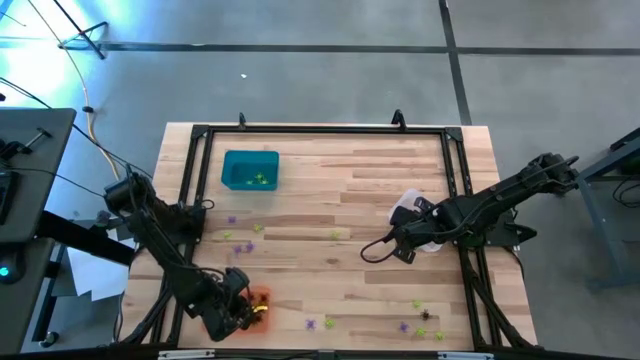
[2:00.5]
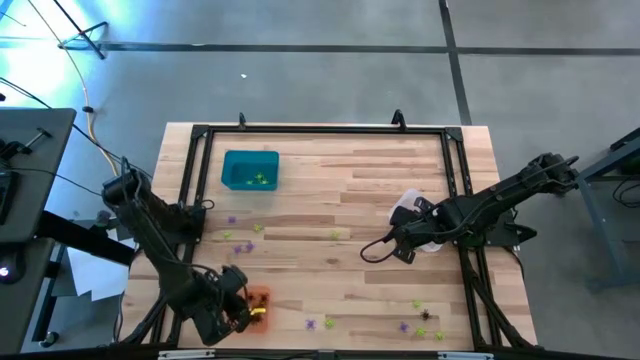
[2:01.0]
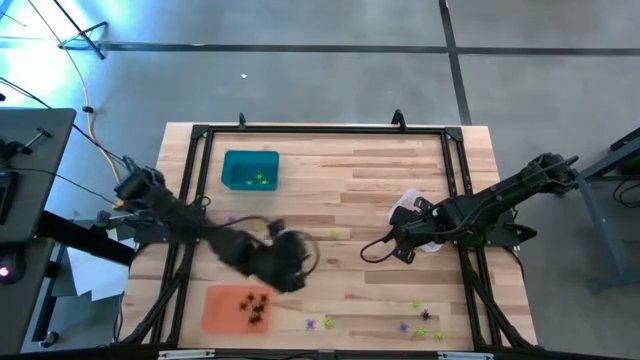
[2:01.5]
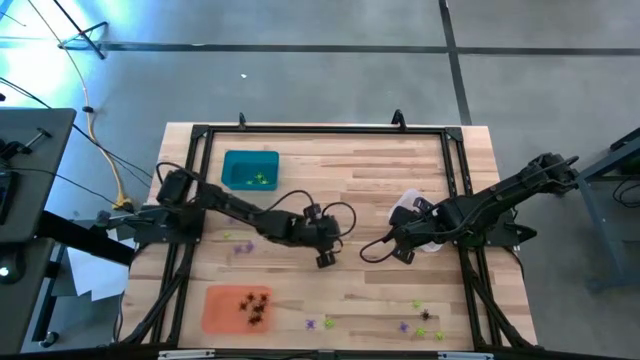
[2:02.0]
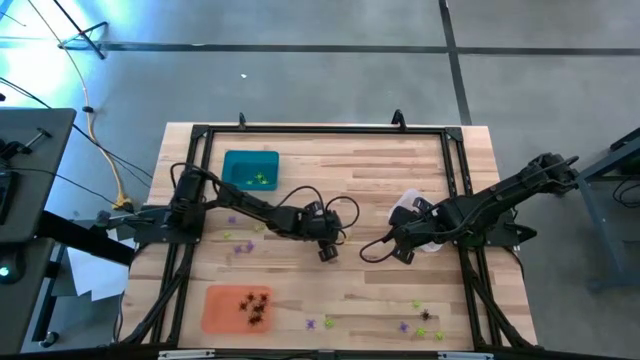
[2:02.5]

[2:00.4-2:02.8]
Task: Sort Halloween decoration
Put the green spider toy into the blue bin

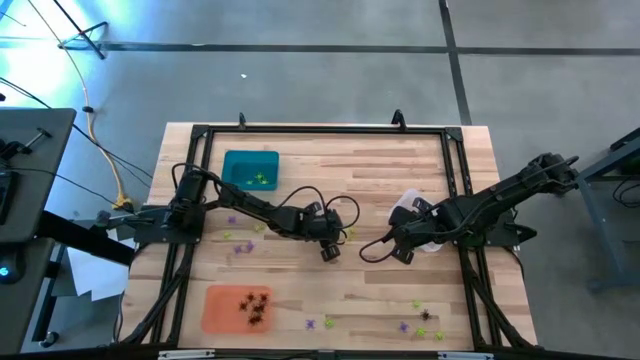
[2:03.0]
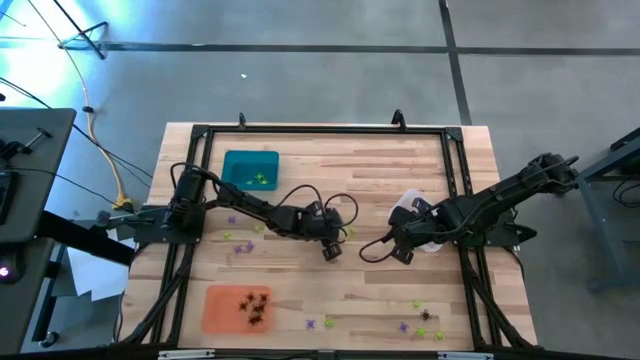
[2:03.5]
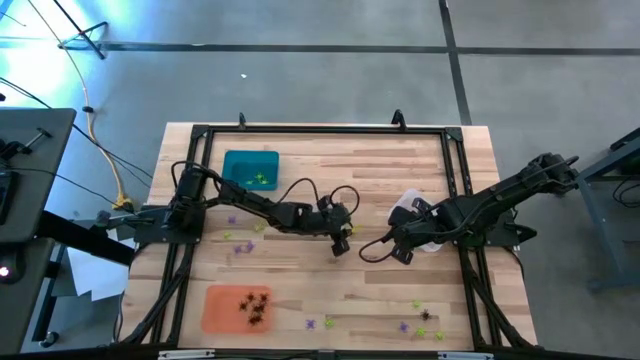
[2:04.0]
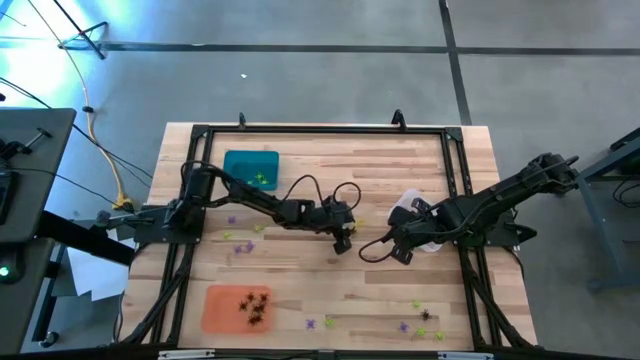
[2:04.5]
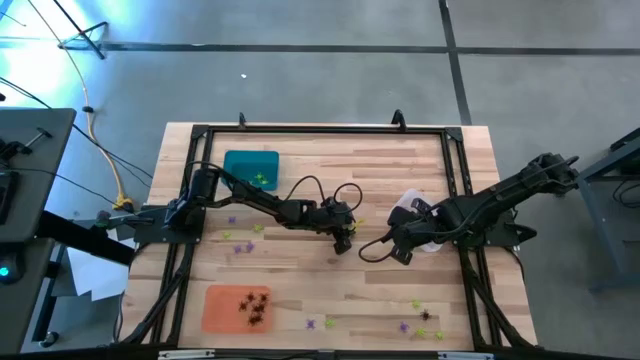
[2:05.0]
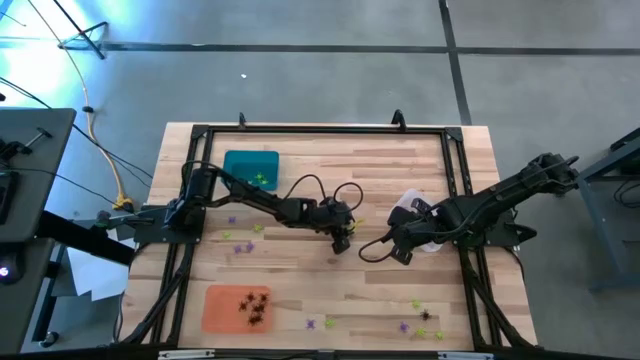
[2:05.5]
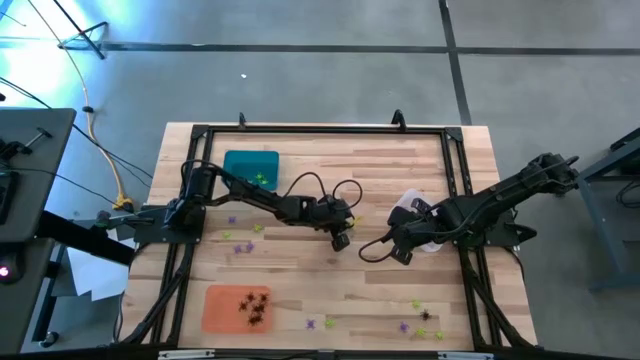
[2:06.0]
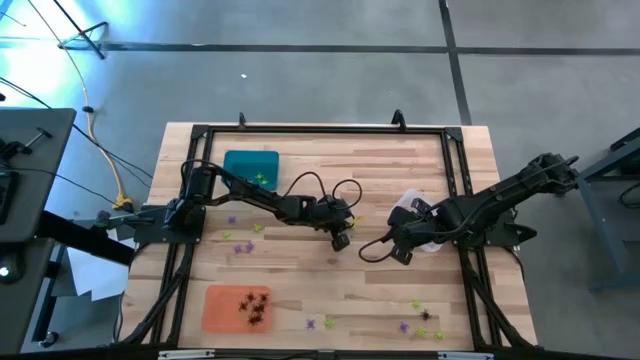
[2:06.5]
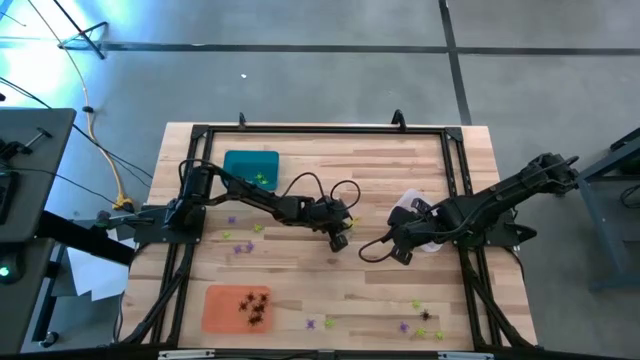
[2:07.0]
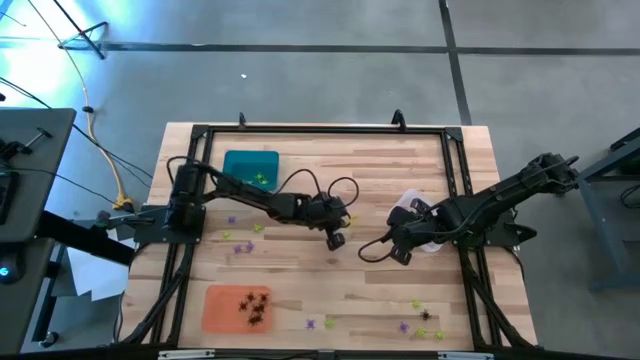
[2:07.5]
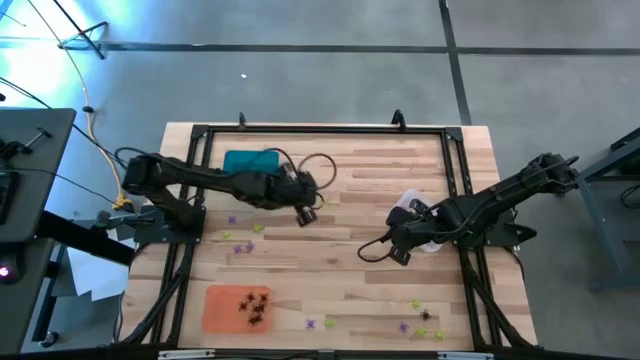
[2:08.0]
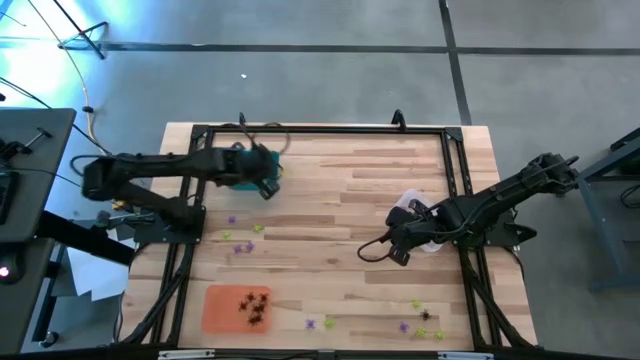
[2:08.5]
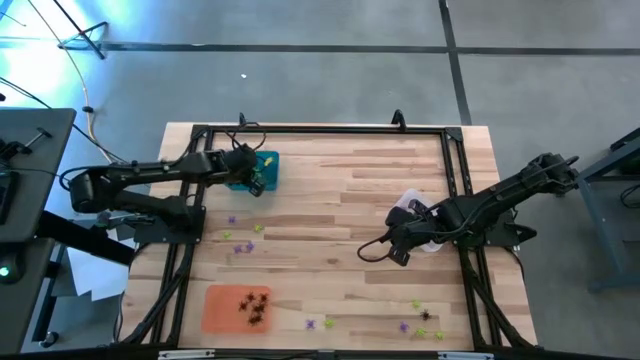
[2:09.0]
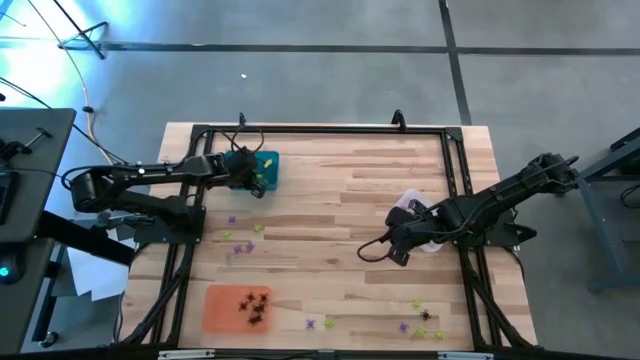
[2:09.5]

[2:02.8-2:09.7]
Put the green spider toy into the blue bin

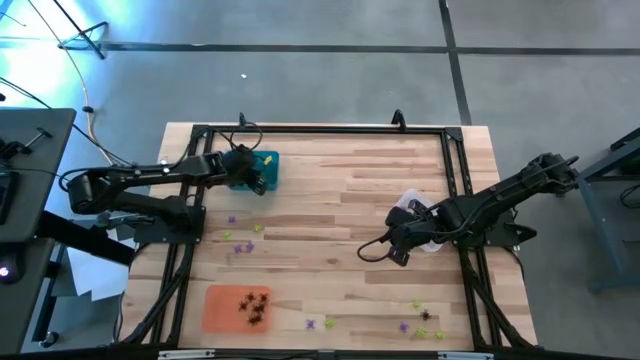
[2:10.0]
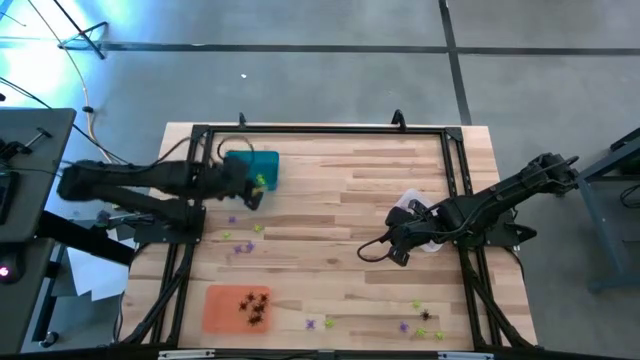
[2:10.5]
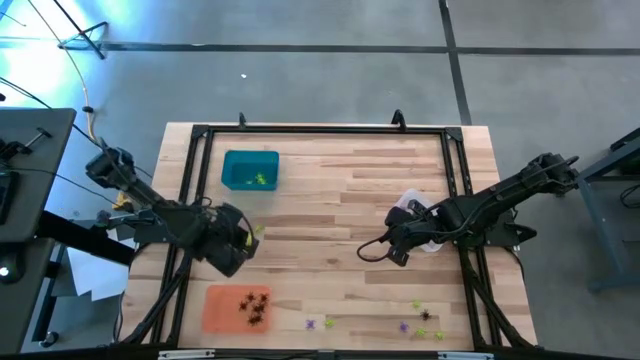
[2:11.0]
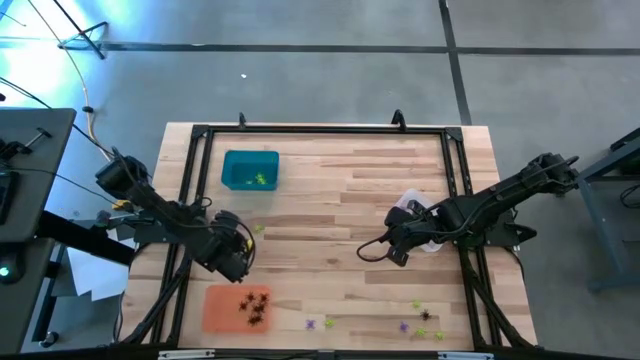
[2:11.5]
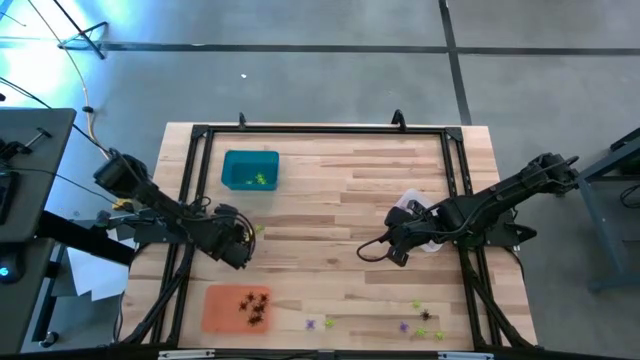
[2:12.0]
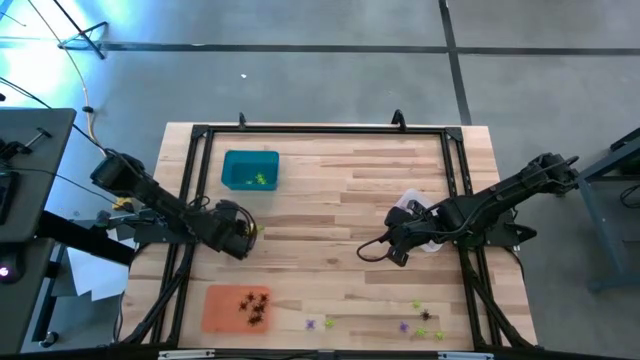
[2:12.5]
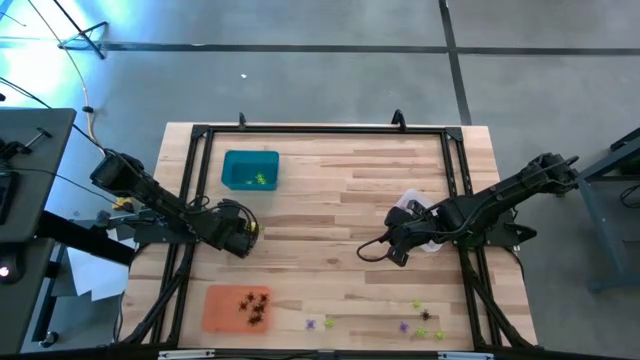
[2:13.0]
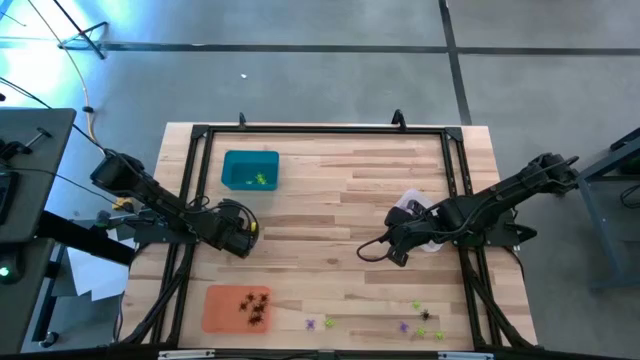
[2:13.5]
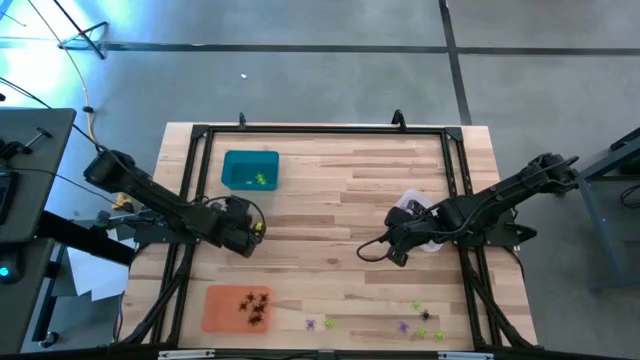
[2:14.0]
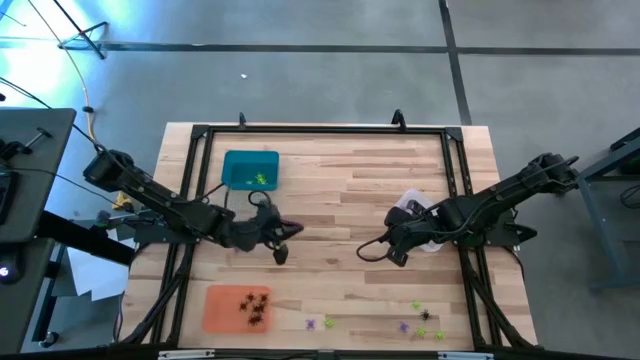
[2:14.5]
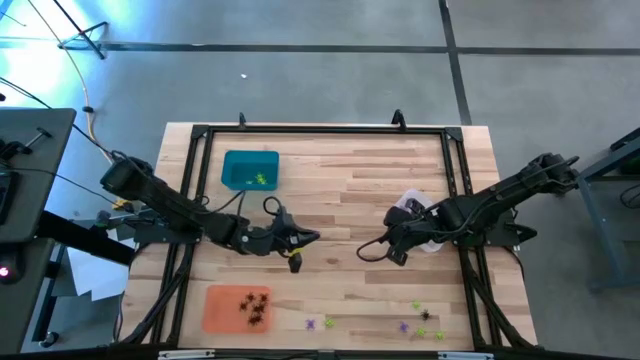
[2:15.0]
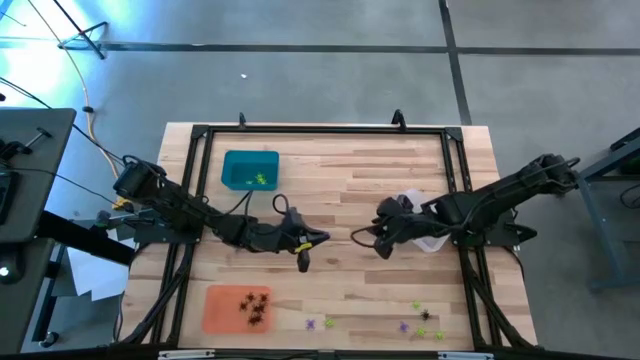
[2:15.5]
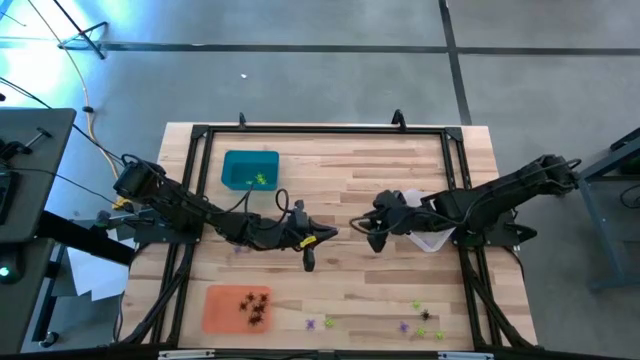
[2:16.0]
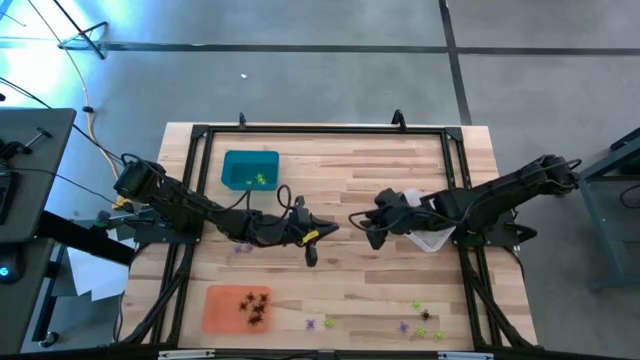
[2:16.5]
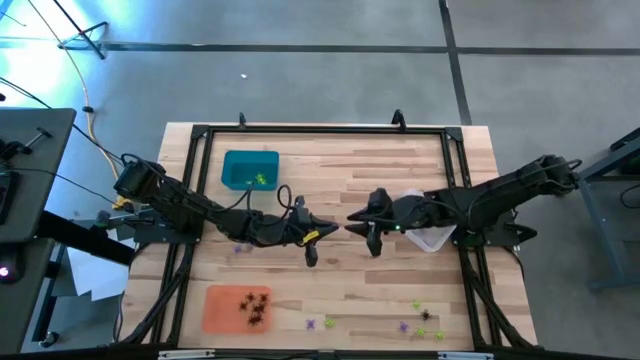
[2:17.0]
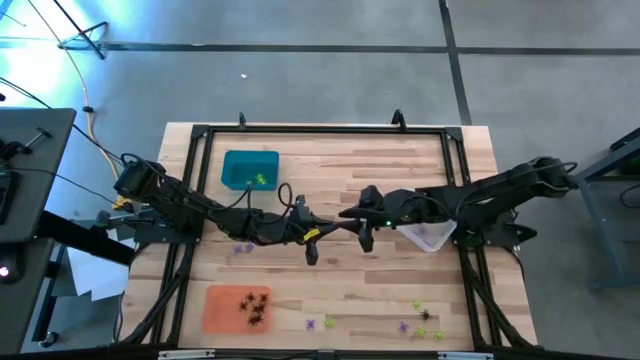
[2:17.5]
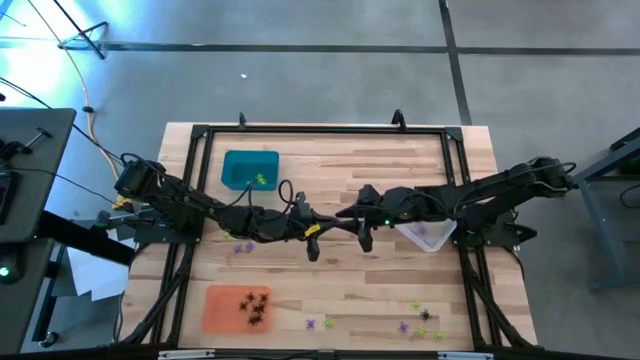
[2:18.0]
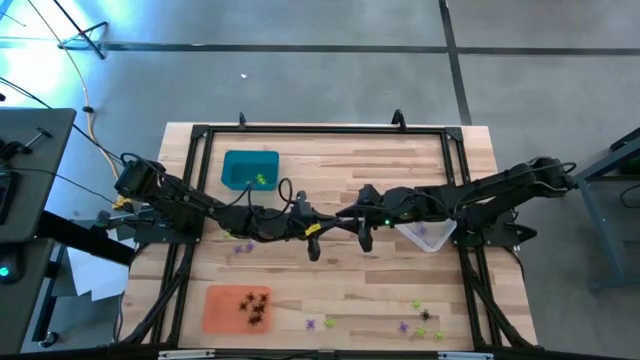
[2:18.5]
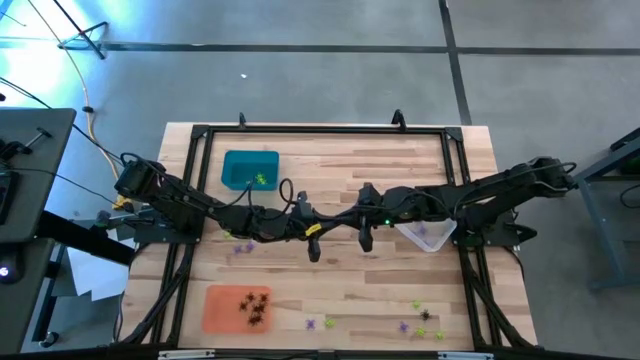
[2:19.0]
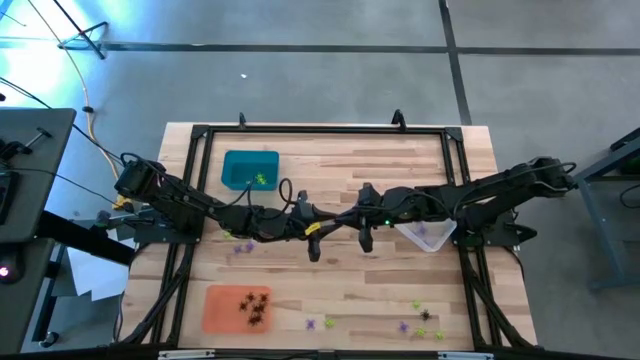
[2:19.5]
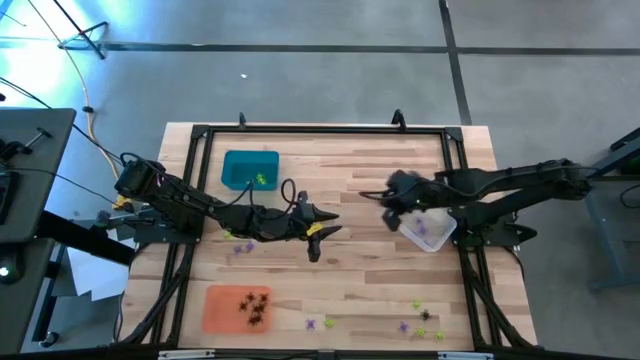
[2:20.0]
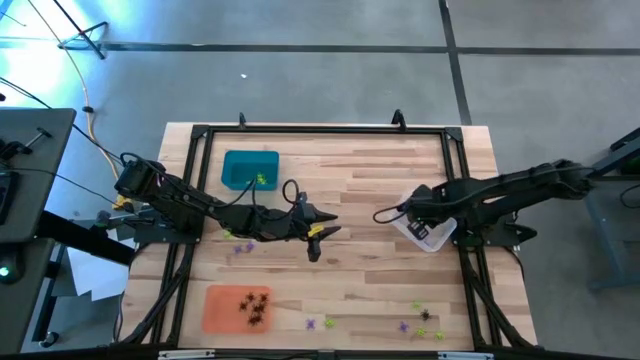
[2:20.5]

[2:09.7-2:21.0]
Put the violet spider toy into the transparent bin

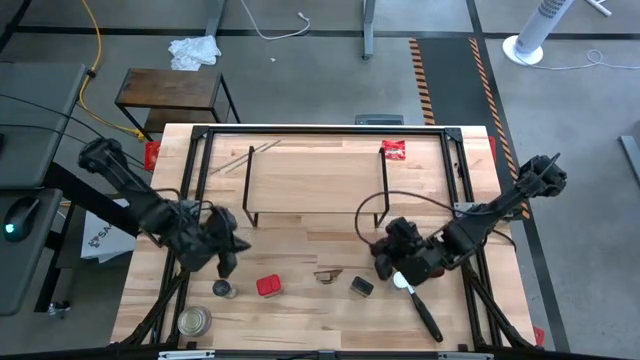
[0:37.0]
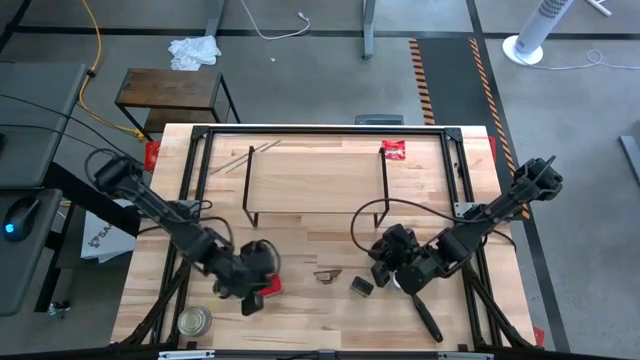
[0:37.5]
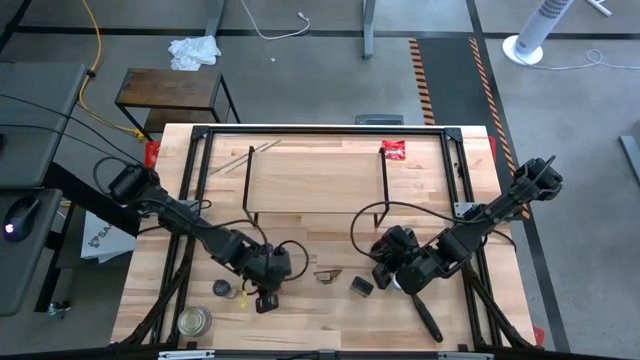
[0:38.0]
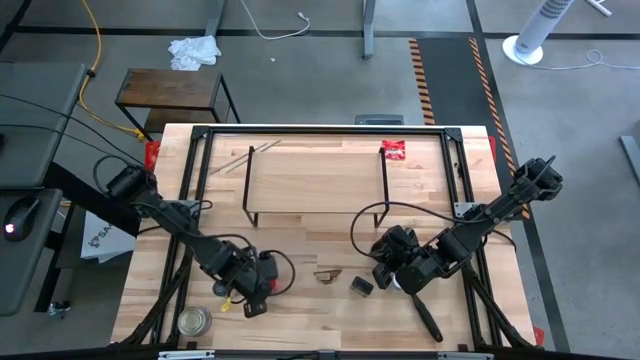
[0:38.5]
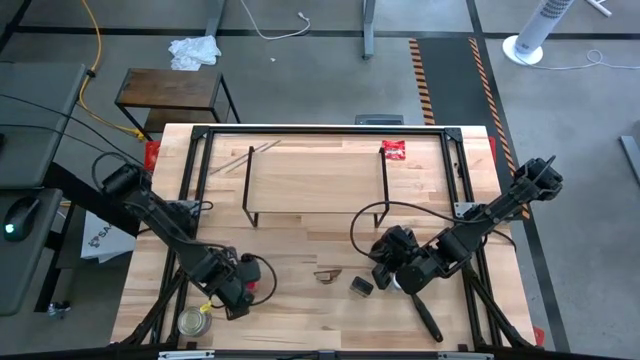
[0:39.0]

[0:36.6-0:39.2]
Task: Shelf spices
Adjust the red seasoning can
